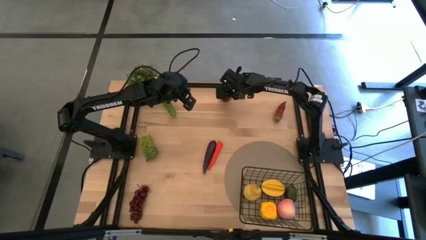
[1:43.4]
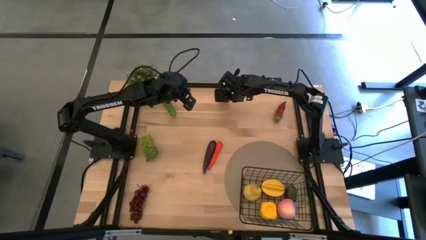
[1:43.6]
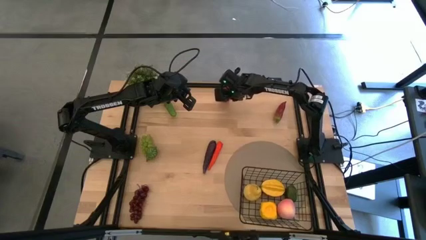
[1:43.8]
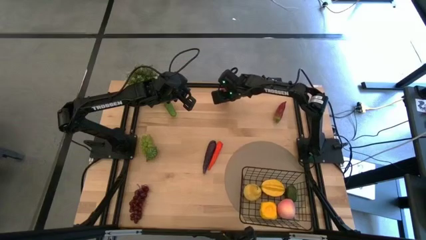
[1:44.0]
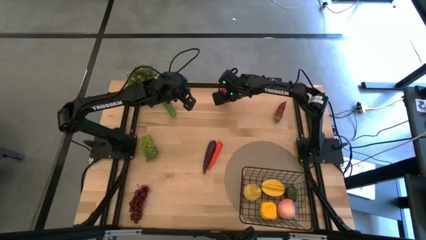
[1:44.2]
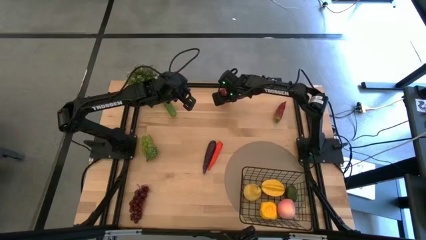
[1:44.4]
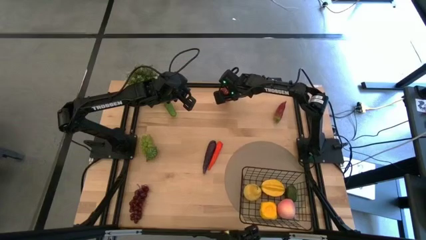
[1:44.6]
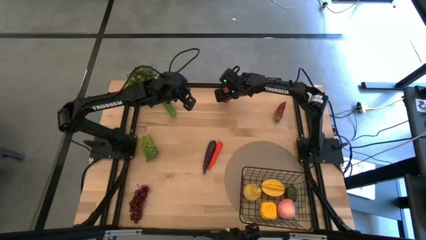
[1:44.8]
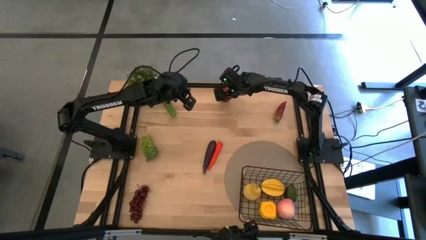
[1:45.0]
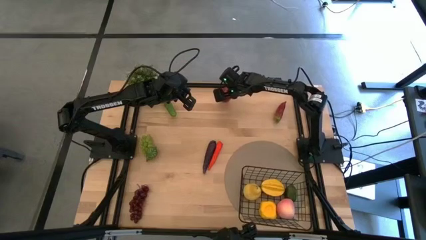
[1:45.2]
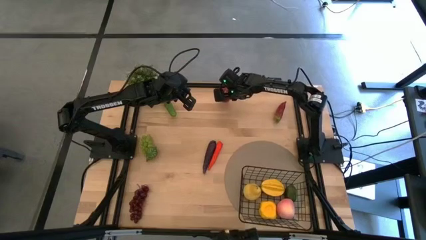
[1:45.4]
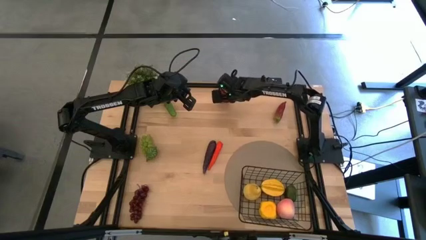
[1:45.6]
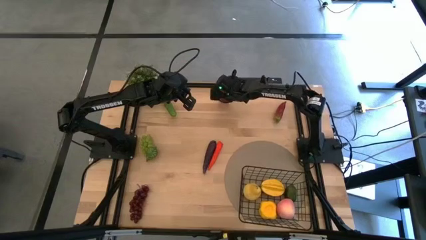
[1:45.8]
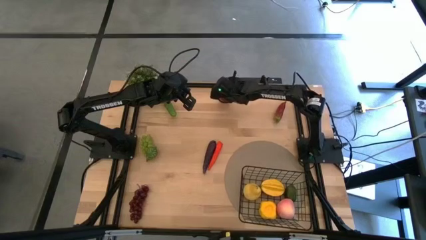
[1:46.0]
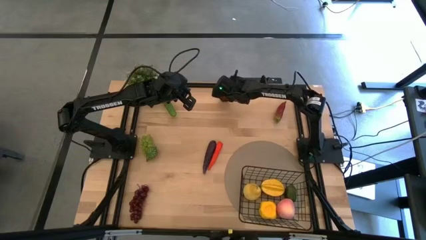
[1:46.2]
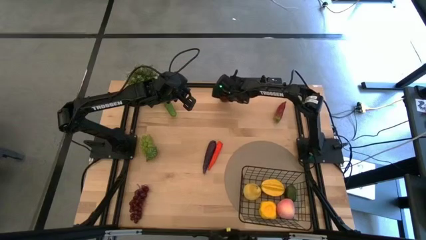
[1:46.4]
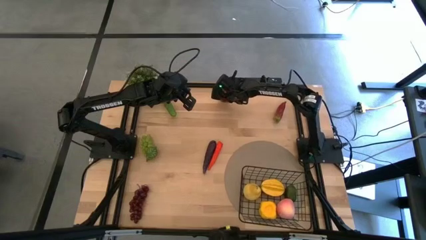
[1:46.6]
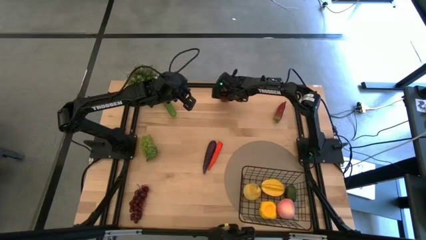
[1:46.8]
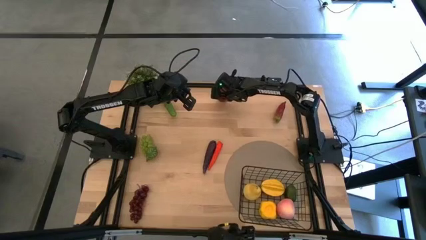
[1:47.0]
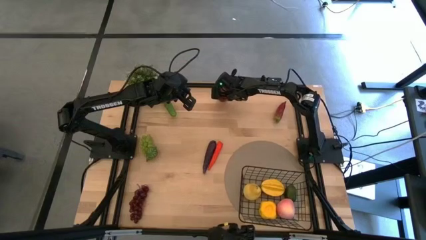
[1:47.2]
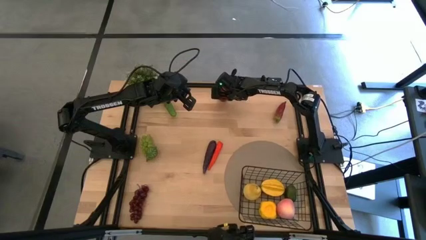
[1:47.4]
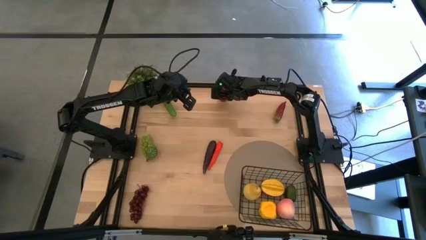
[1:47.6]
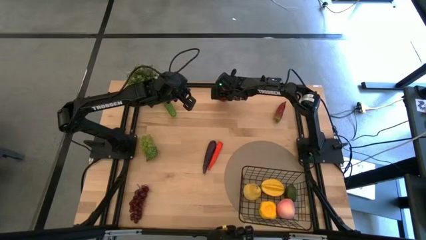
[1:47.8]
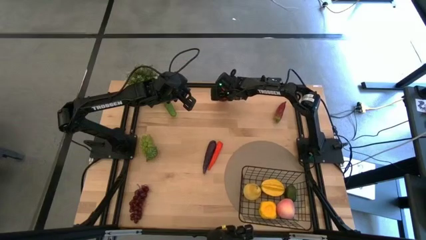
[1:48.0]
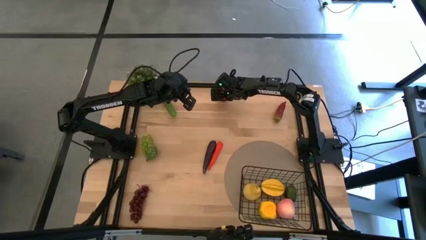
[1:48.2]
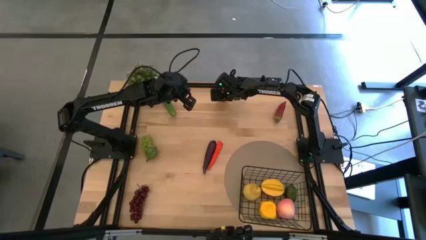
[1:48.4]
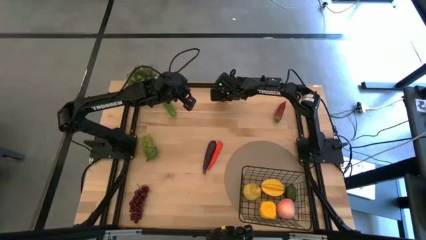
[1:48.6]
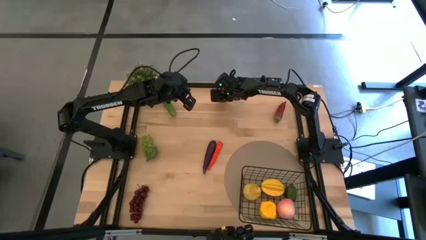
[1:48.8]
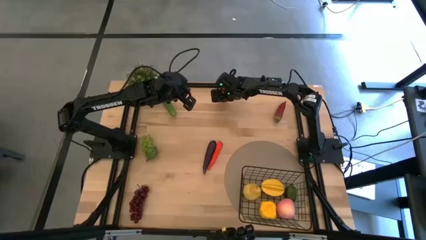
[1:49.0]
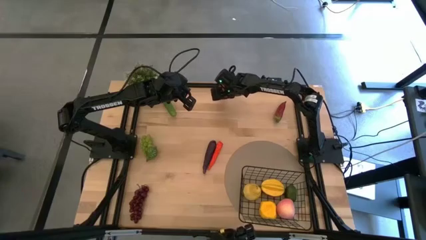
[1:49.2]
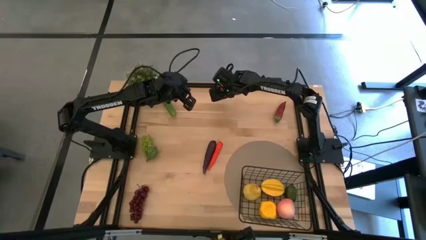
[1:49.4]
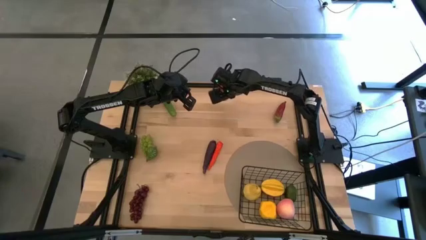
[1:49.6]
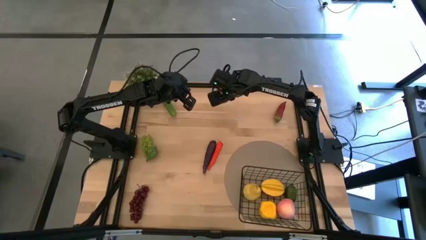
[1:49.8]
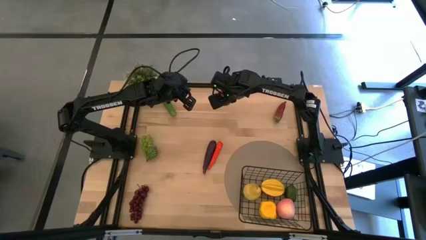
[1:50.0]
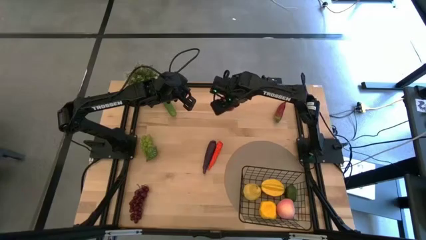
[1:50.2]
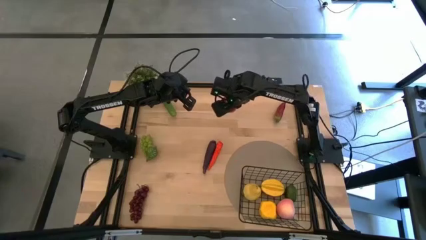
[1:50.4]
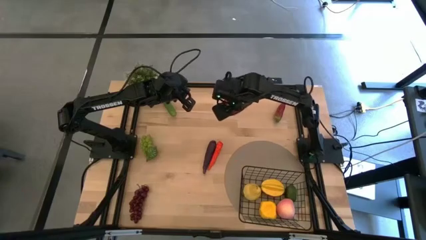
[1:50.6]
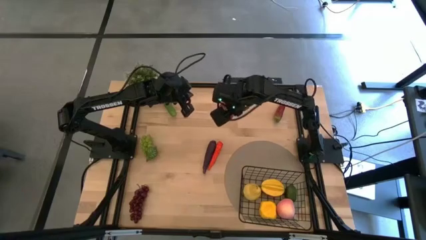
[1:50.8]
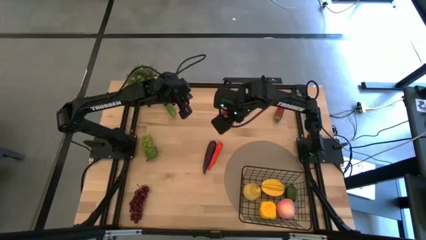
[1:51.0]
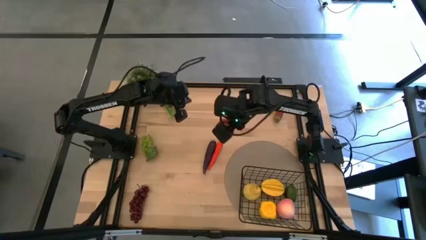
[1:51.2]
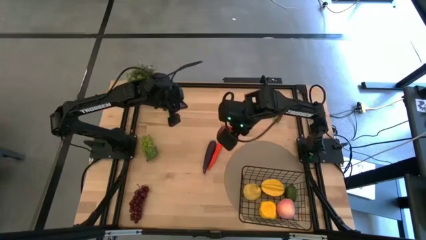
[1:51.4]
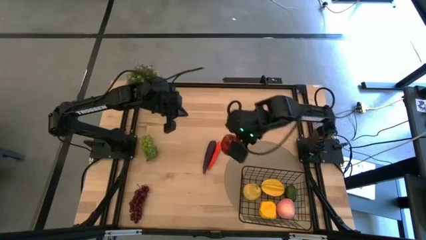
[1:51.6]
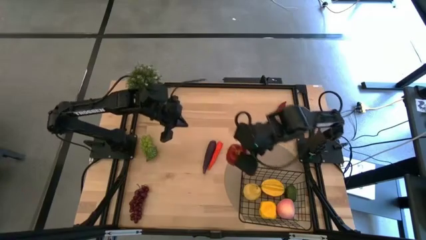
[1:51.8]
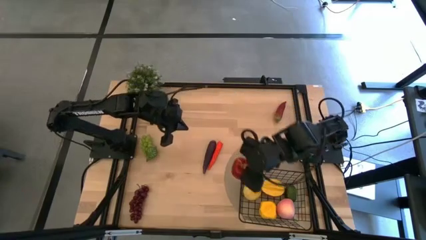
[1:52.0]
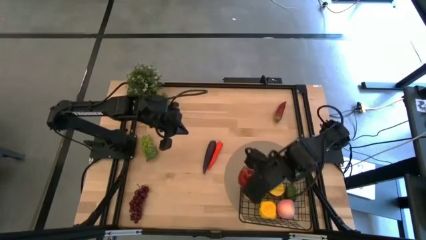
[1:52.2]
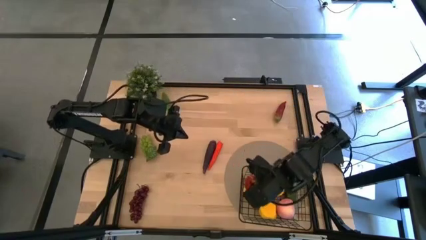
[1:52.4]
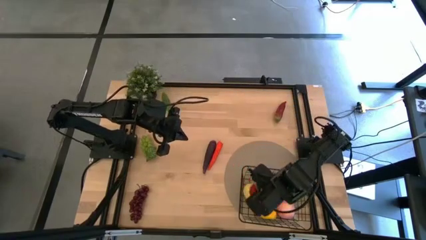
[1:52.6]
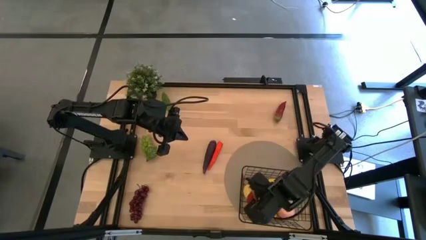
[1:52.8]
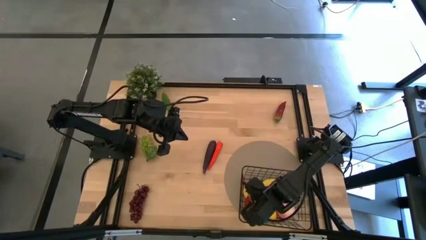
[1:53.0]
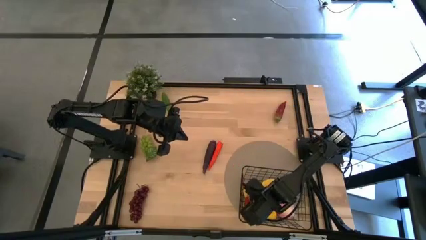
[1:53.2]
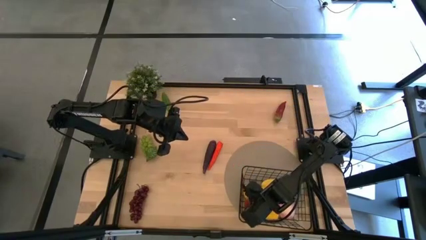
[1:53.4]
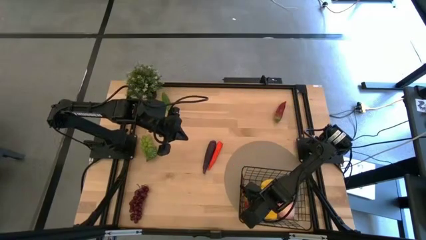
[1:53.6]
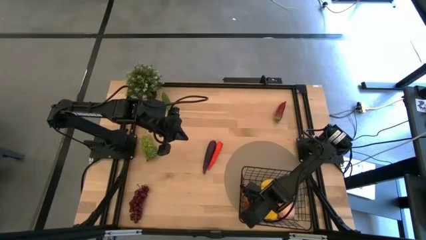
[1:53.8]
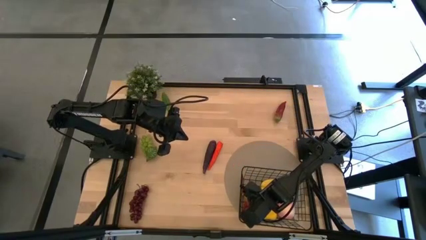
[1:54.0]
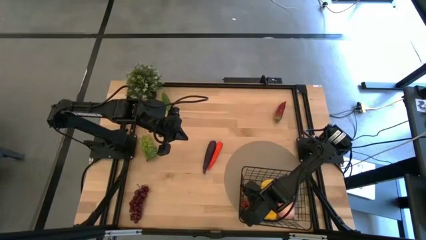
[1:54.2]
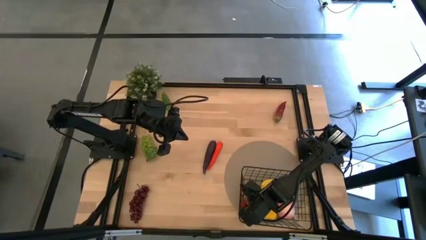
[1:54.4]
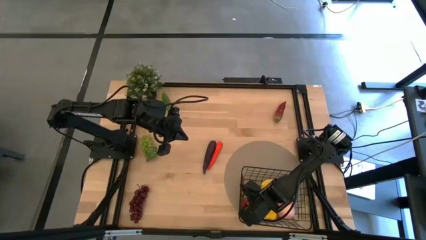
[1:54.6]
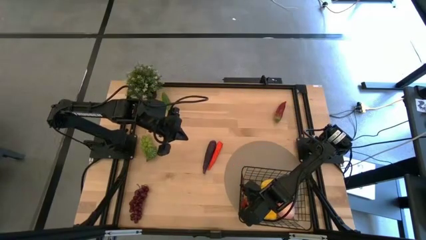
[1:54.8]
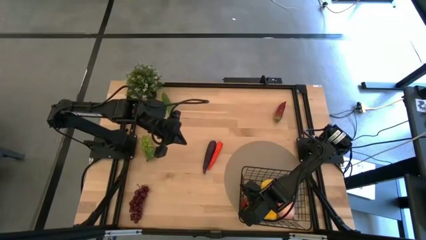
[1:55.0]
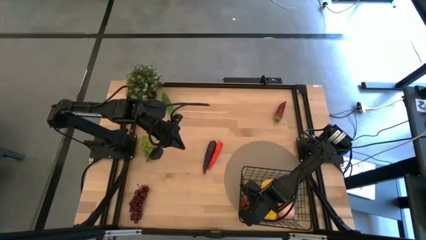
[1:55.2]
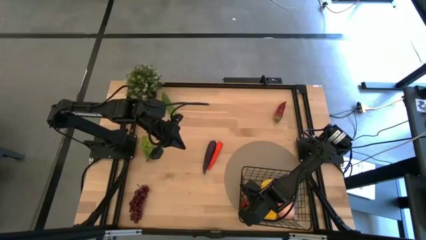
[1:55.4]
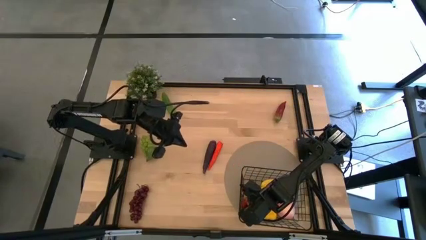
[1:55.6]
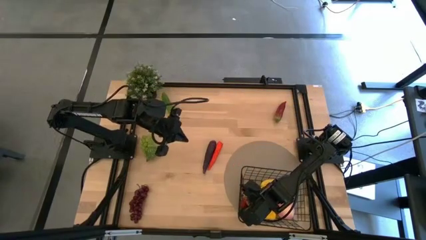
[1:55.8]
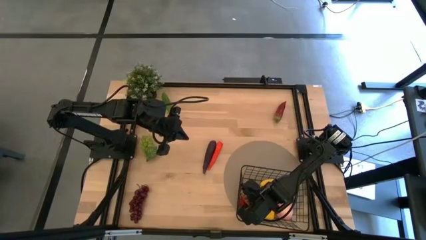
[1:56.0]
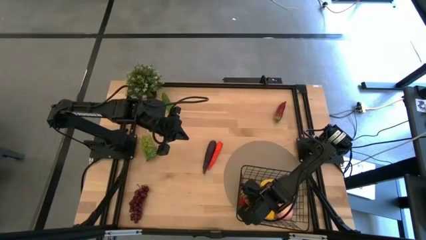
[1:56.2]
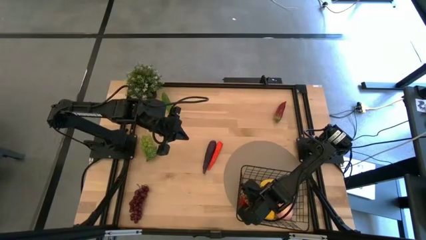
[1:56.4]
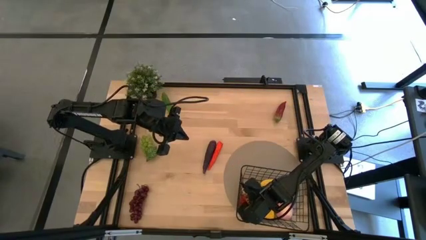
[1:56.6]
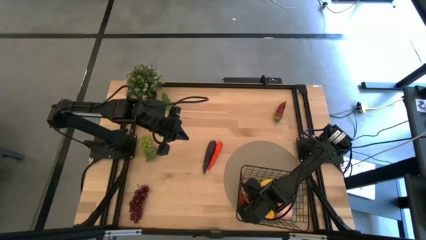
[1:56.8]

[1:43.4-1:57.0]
Task: Build produce basket
Put the red apple into the wire basket

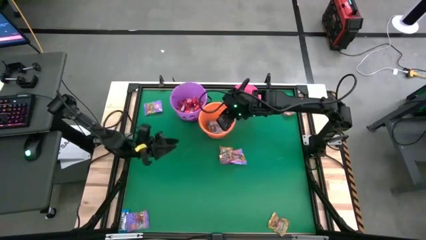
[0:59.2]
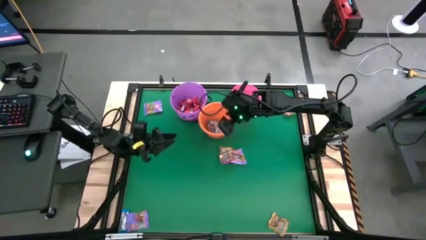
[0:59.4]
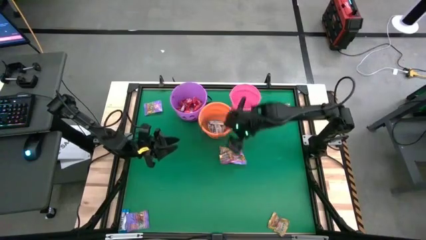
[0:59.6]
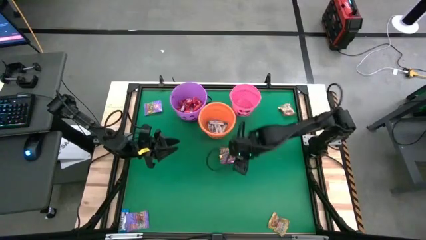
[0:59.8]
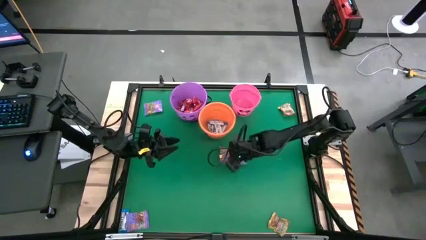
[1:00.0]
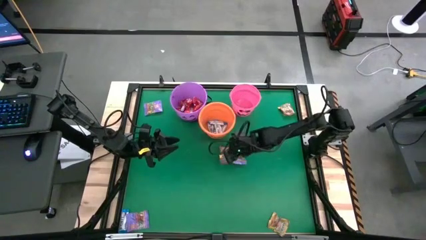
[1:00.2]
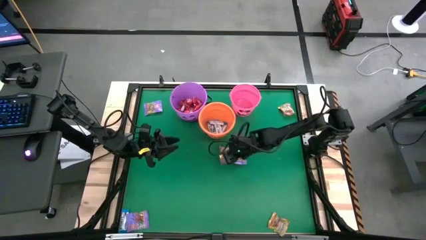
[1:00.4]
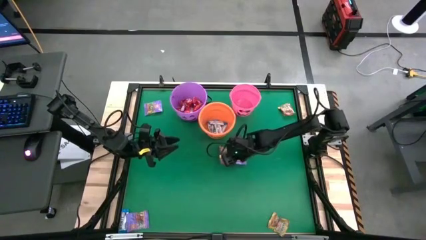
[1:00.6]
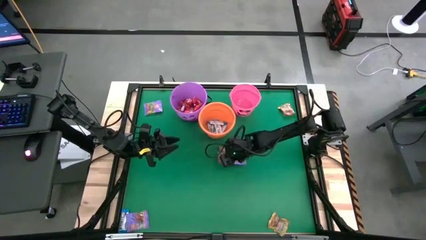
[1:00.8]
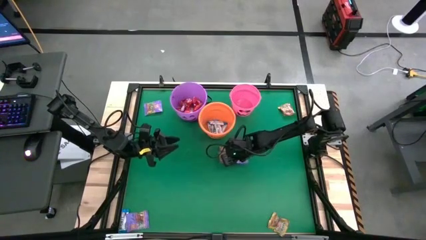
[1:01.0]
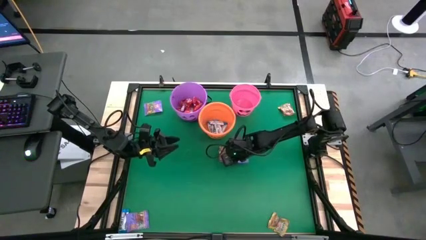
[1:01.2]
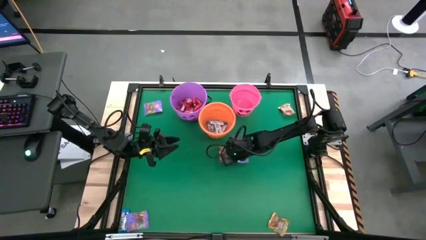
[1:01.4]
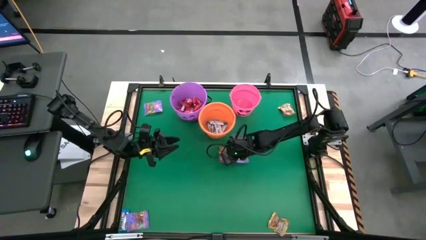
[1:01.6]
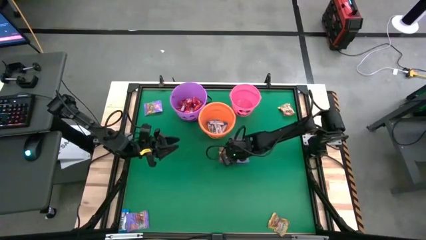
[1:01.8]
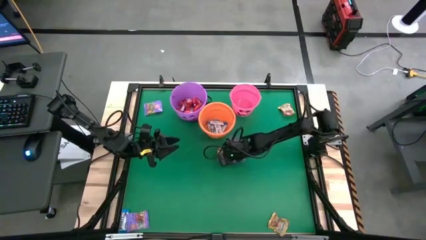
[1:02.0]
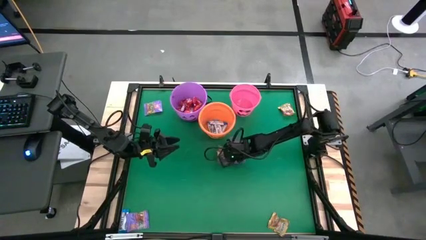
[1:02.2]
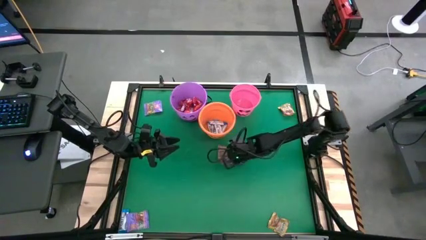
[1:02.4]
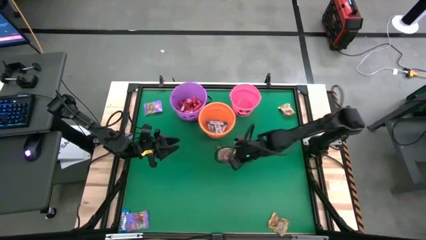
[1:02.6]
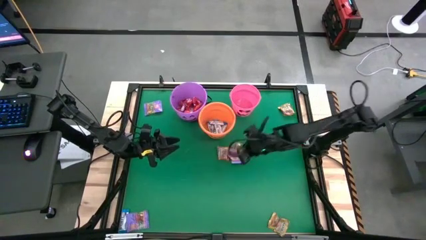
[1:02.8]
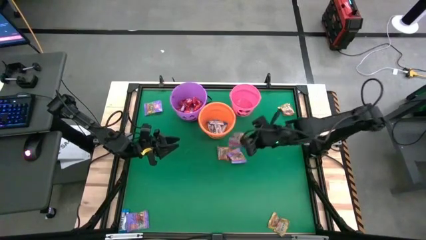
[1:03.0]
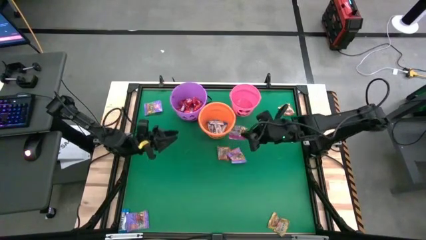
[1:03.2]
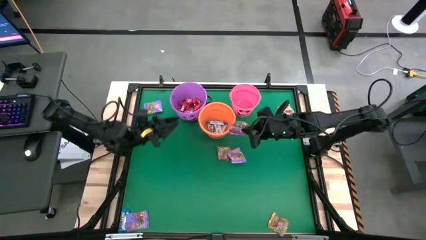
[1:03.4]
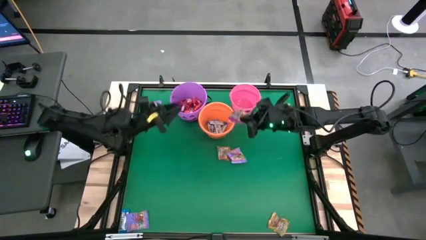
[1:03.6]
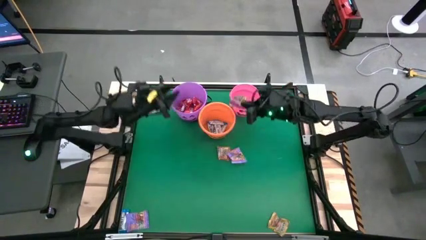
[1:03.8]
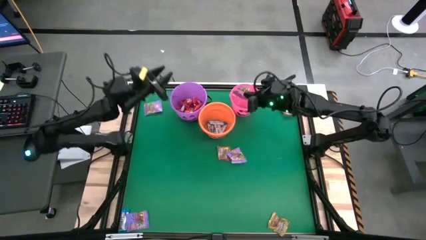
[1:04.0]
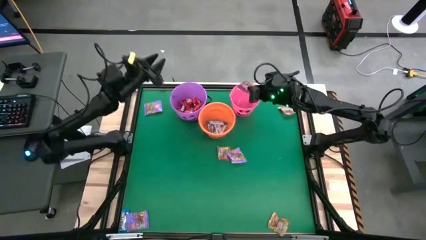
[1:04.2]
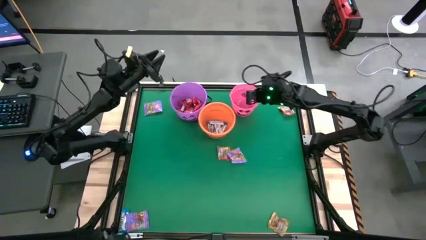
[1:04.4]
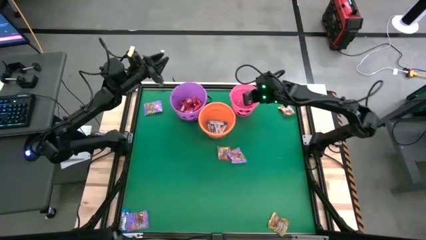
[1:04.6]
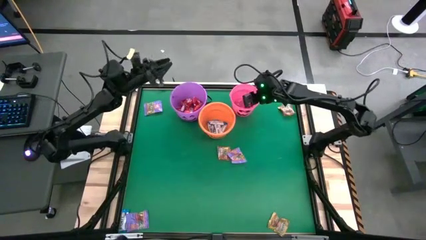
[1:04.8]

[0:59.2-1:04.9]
Task: Sort candy by brand, put in halloween buckets
Put the gold gummy candy into the pink bucket
